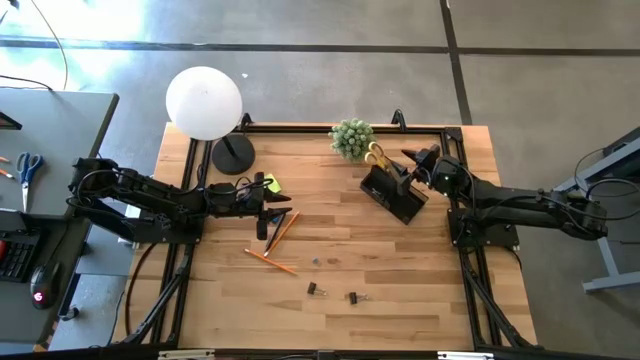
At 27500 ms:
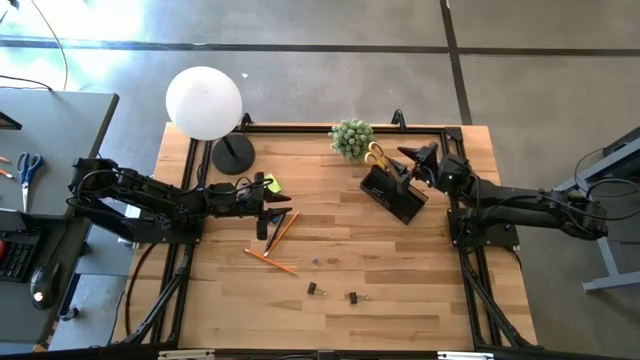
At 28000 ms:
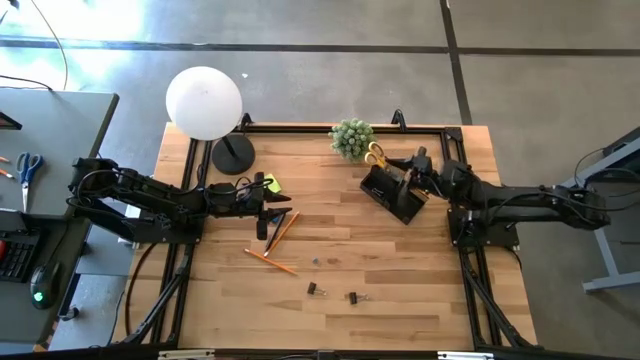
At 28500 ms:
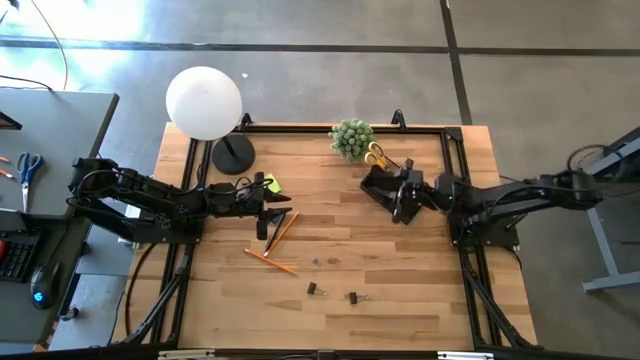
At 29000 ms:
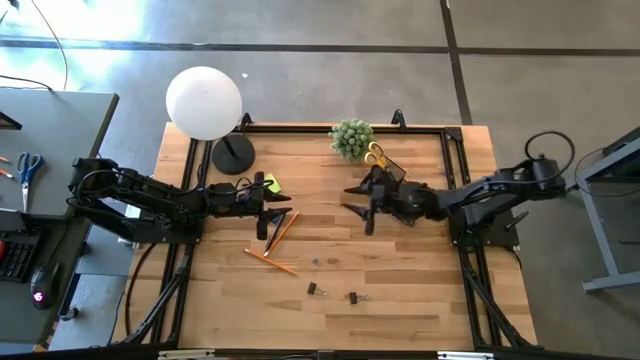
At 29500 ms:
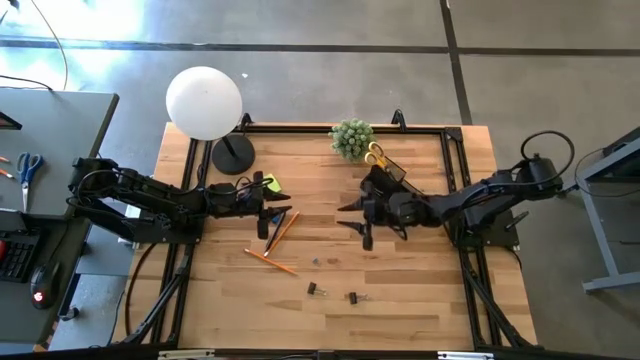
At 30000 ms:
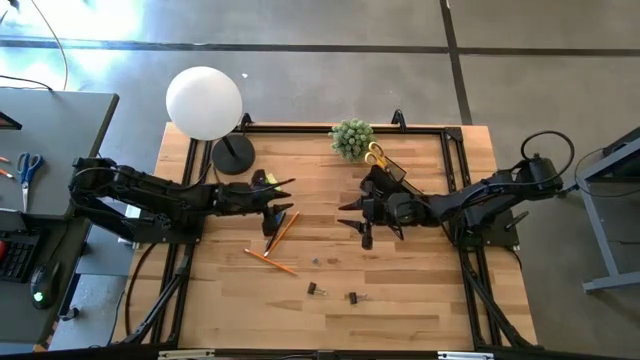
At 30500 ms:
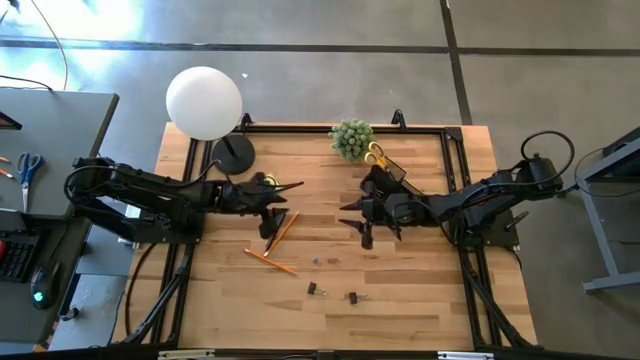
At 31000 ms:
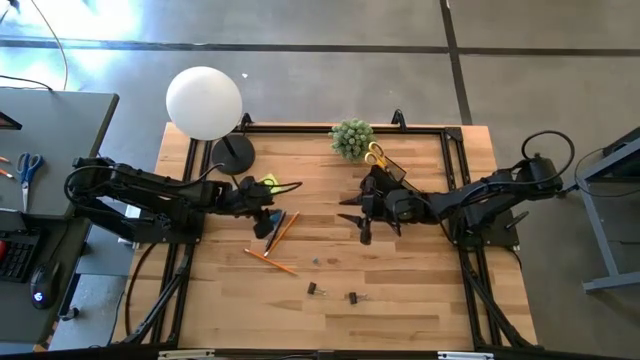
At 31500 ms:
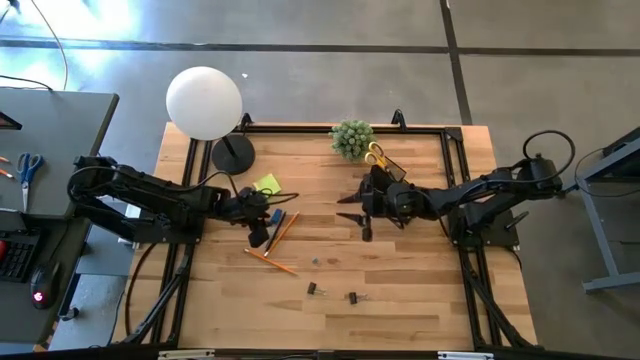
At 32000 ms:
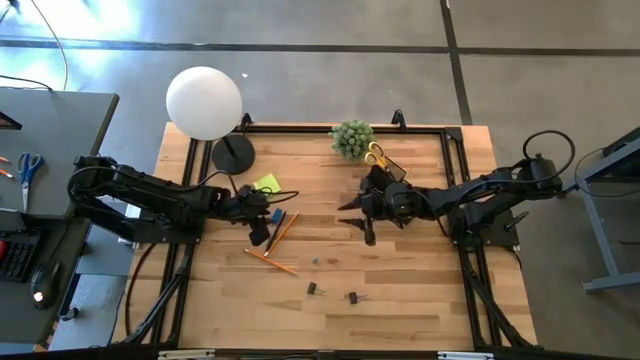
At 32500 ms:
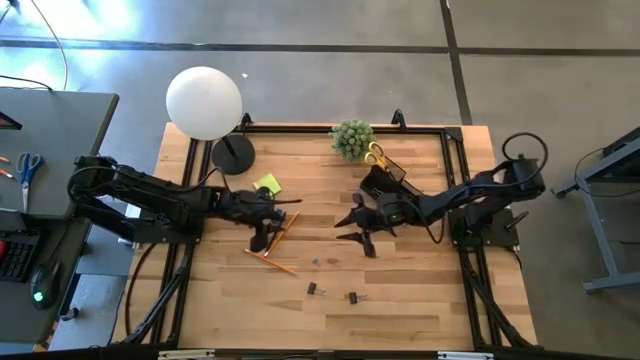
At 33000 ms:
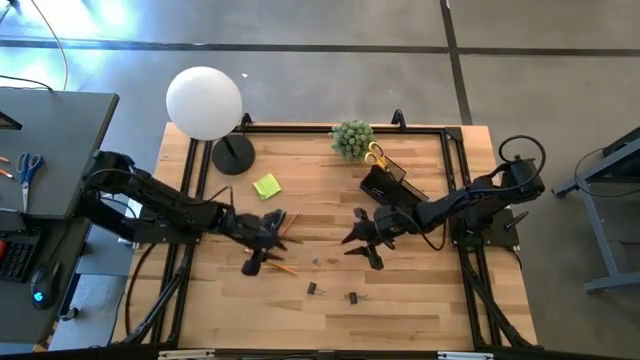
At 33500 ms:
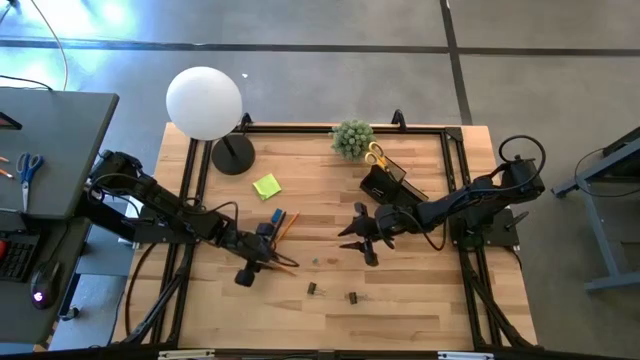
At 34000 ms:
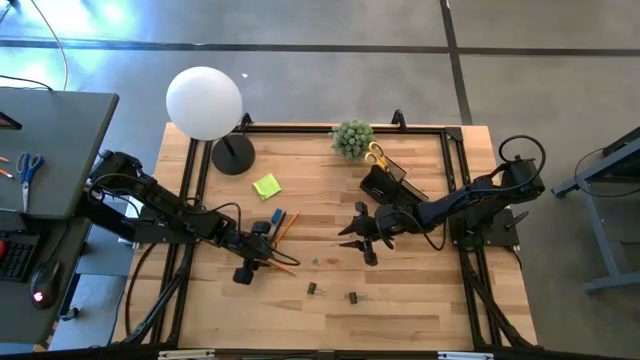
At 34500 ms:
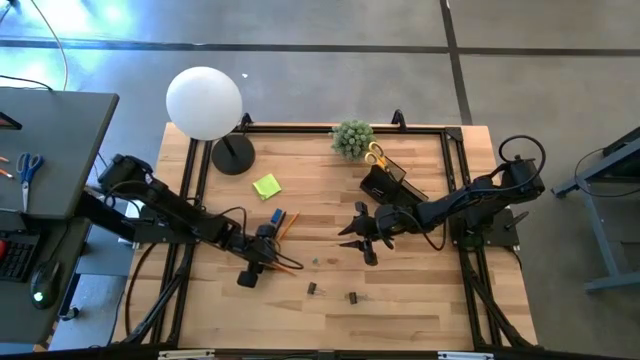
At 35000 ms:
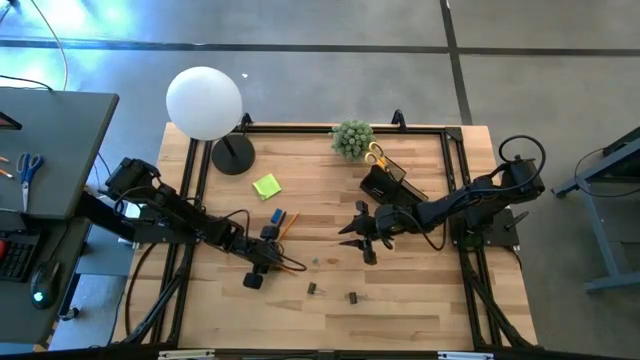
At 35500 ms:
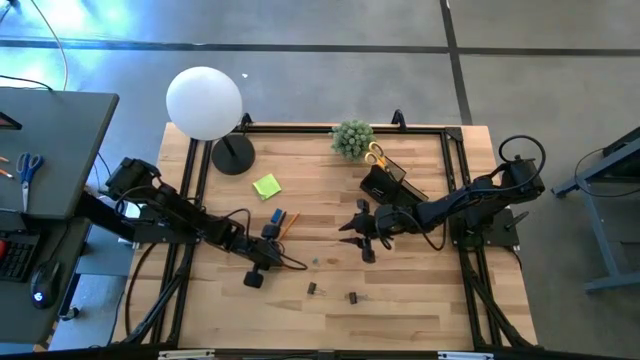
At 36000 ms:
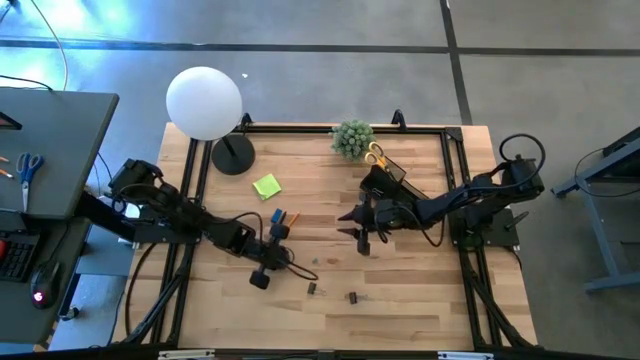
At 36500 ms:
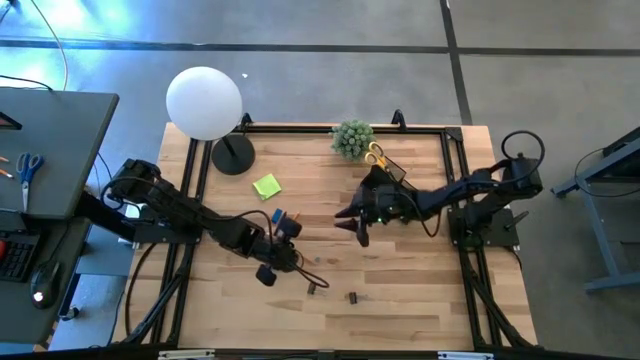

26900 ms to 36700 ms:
Task: Pick and place office supplies into organizer
Put the bottom orange pencil into the desk organizer

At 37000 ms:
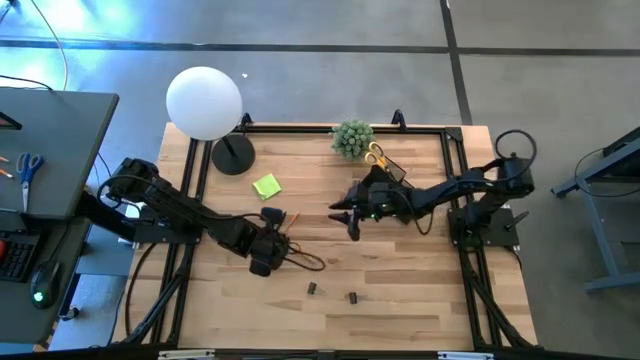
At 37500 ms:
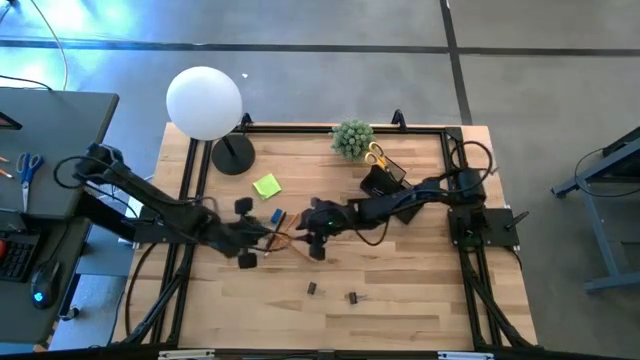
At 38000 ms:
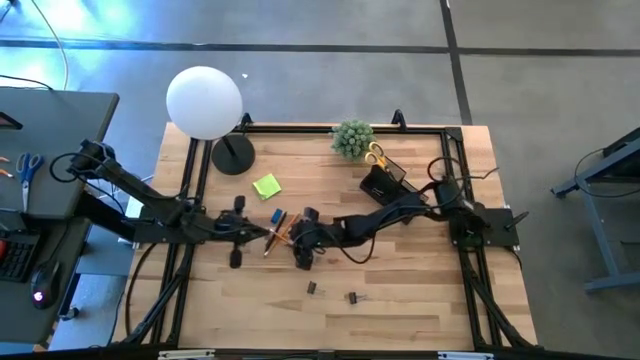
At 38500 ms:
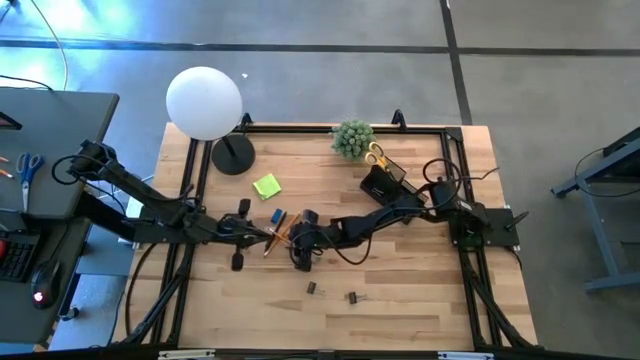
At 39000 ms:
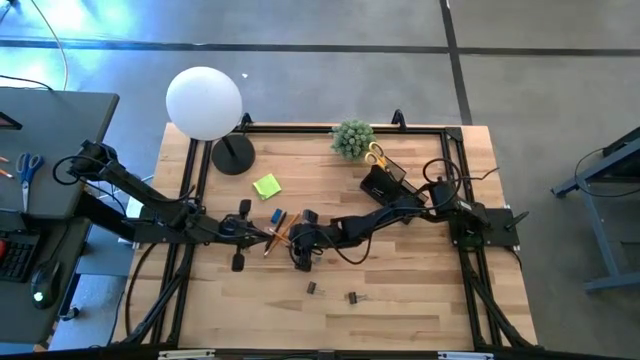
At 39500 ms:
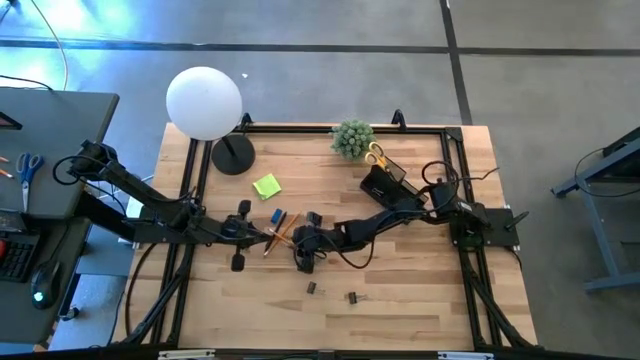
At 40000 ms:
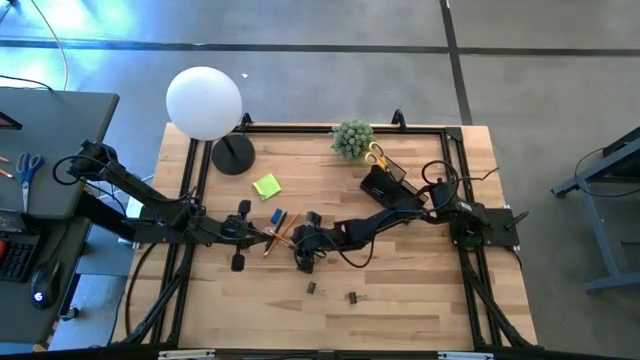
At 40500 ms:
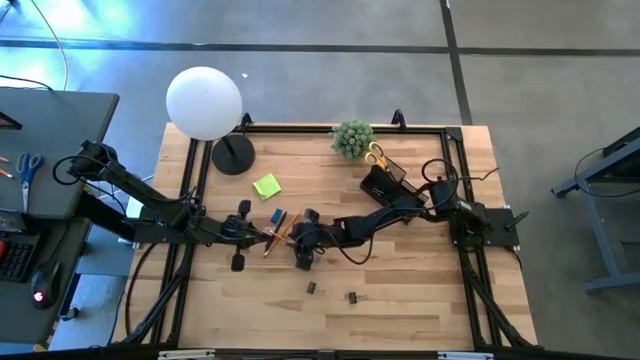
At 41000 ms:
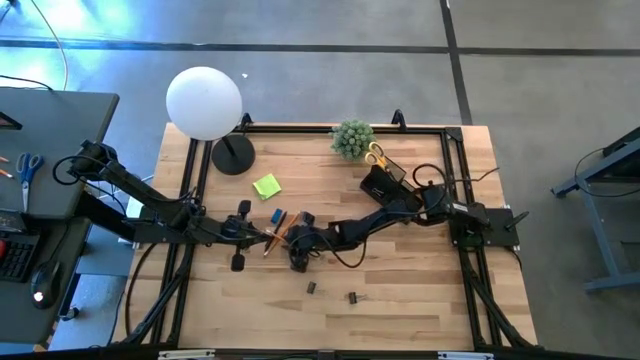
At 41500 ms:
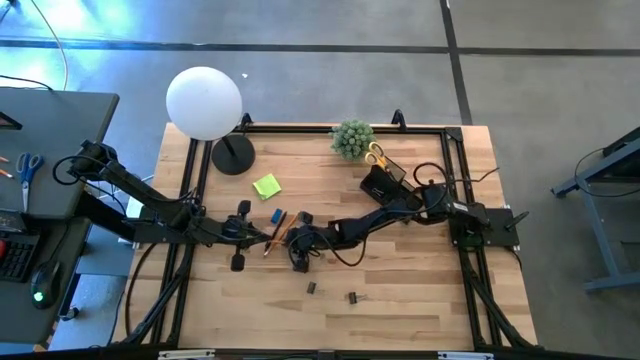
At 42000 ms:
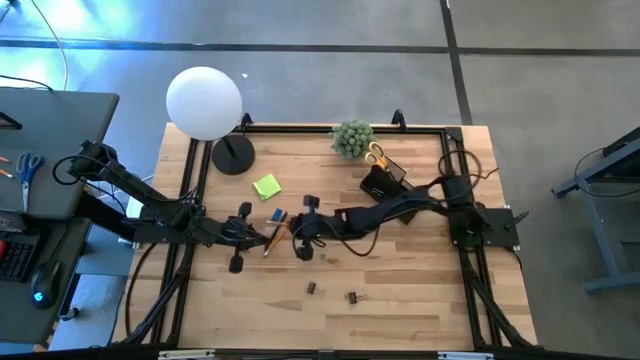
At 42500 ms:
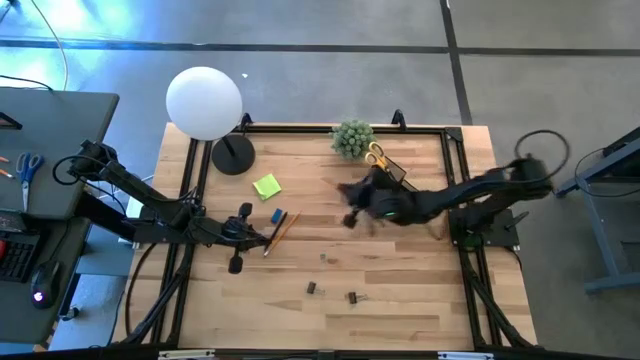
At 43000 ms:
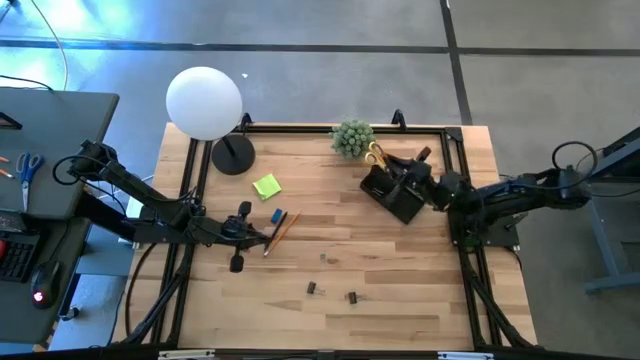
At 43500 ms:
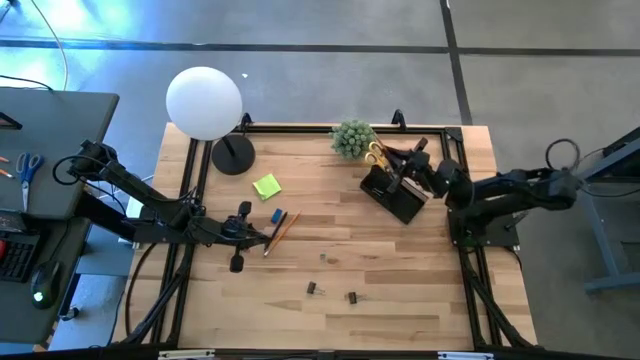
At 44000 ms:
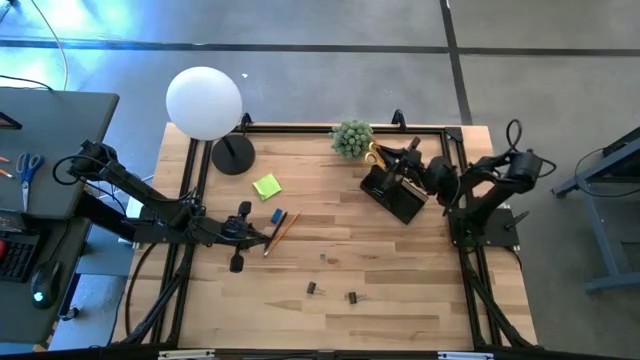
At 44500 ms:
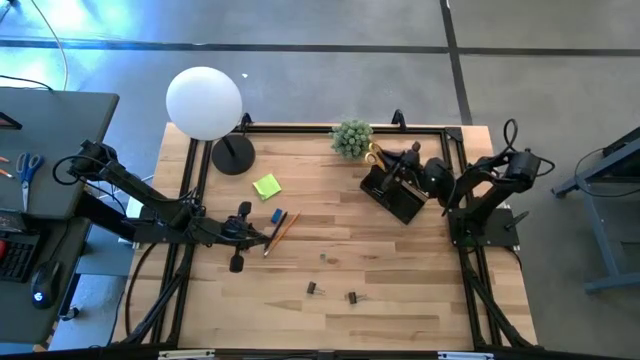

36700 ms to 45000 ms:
Put the bottom orange pencil into the desk organizer

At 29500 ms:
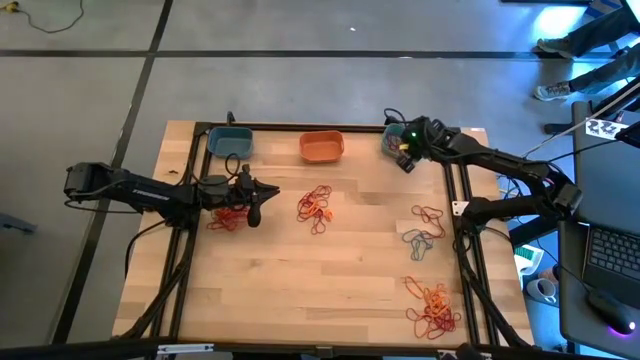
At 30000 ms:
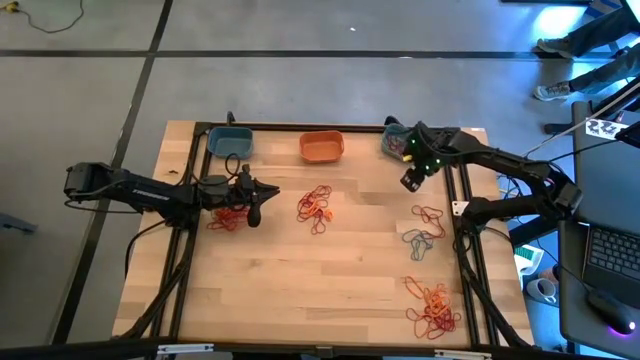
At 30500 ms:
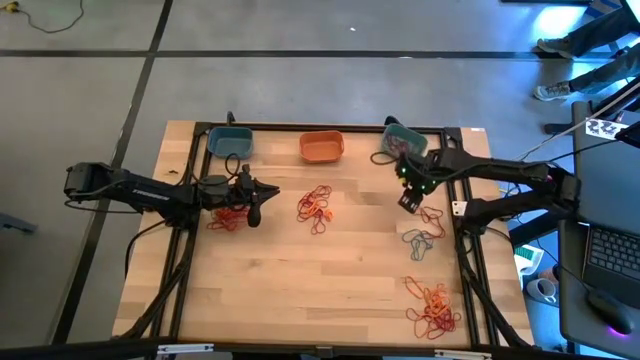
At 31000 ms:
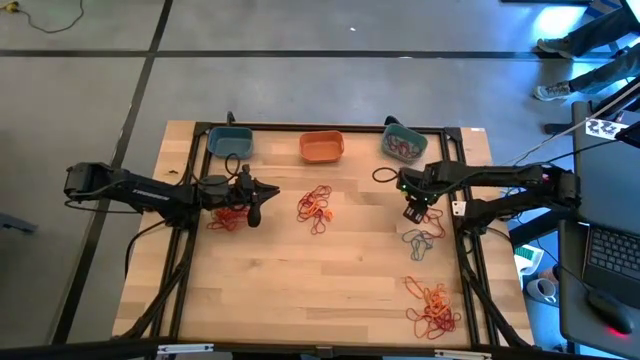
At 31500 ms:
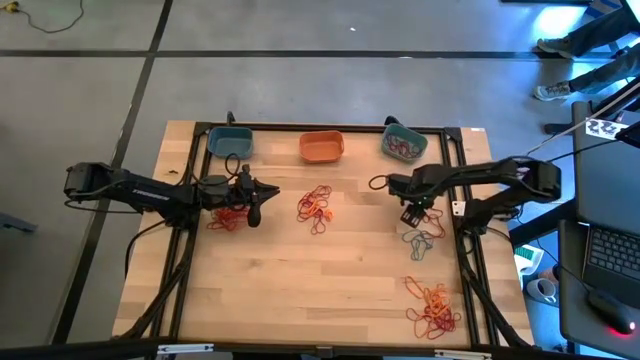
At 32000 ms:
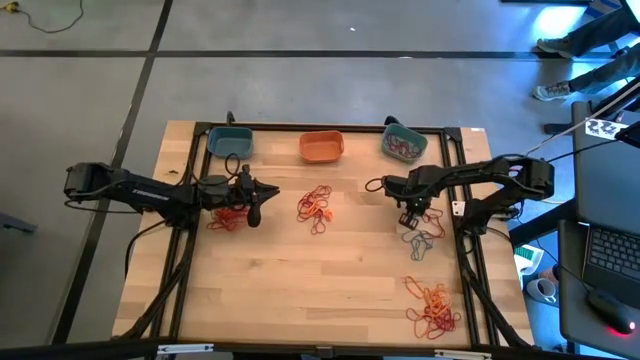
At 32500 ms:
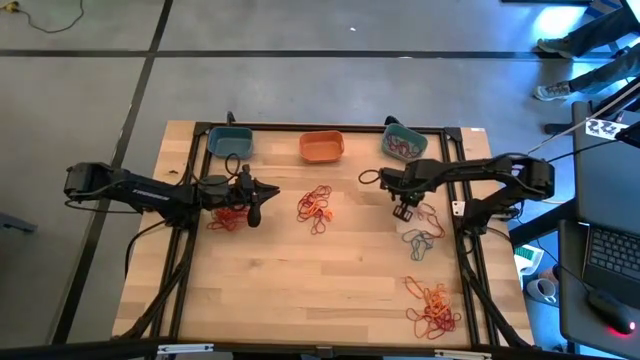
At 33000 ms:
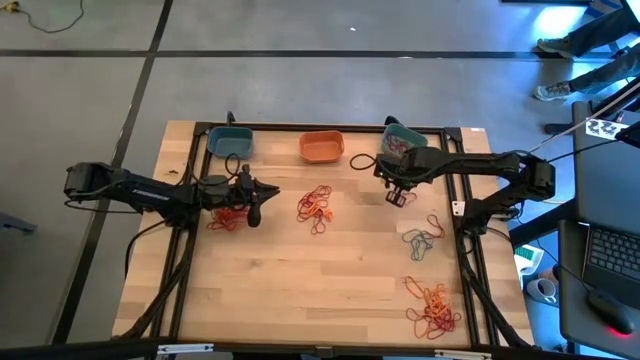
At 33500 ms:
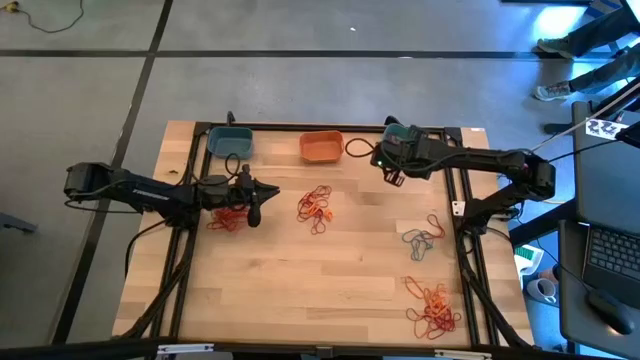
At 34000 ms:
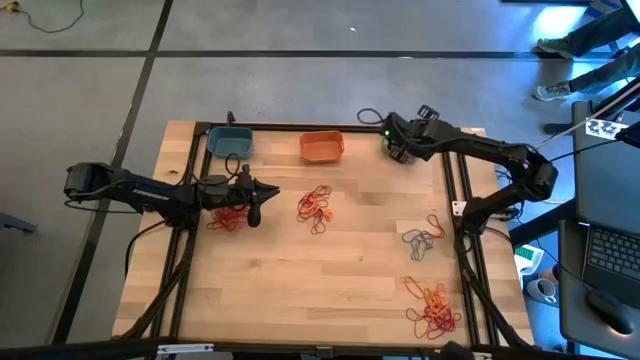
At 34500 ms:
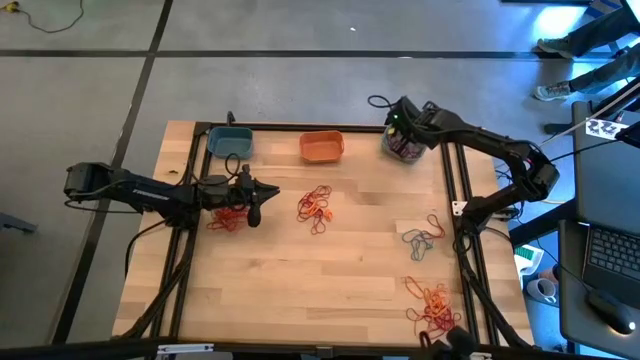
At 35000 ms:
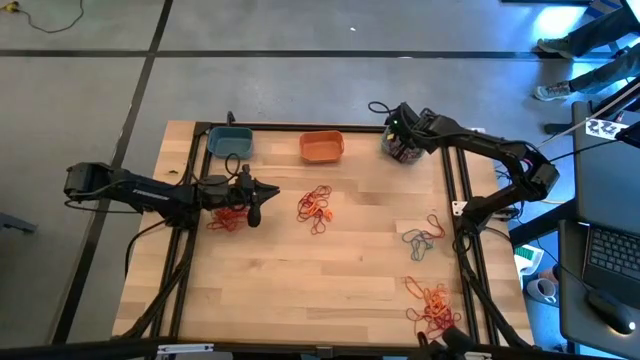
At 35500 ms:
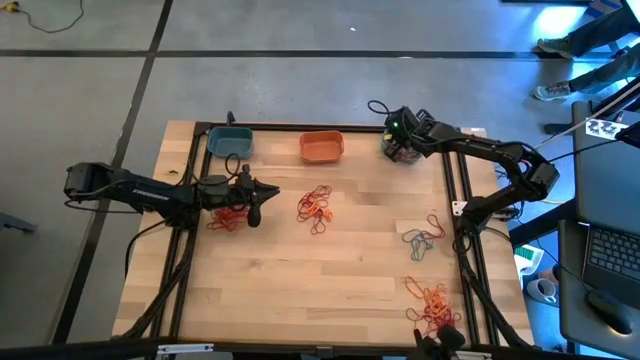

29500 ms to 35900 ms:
Task: Sort rubber bands into baskets
Put the red rubber band into the green bin
